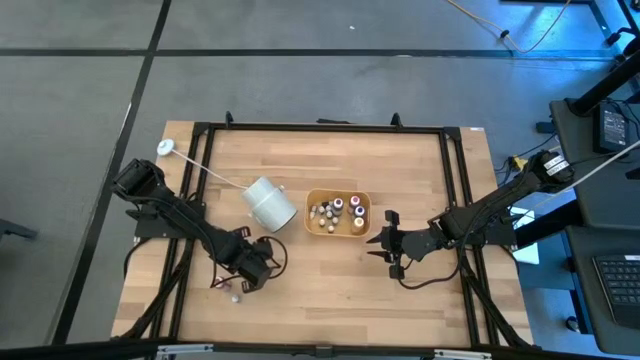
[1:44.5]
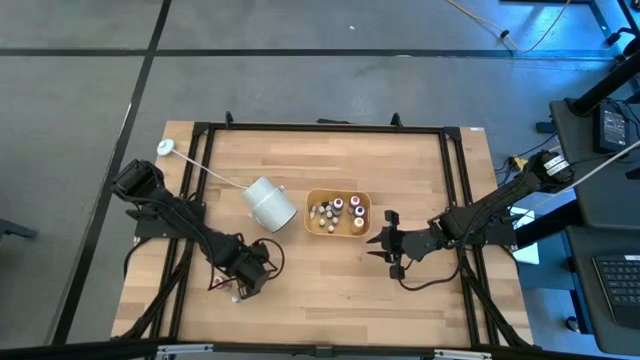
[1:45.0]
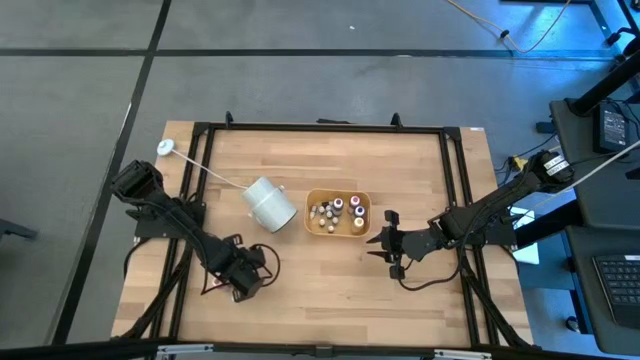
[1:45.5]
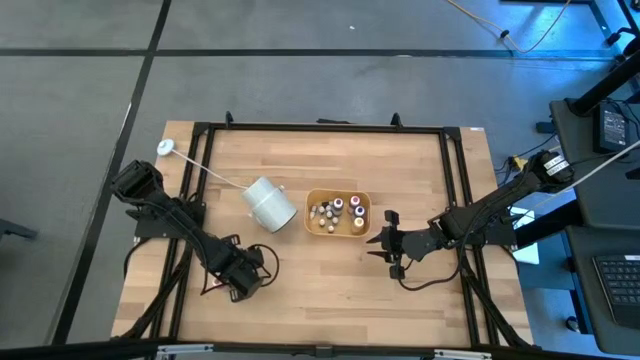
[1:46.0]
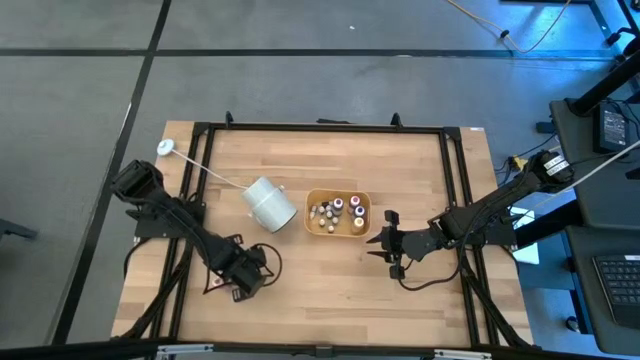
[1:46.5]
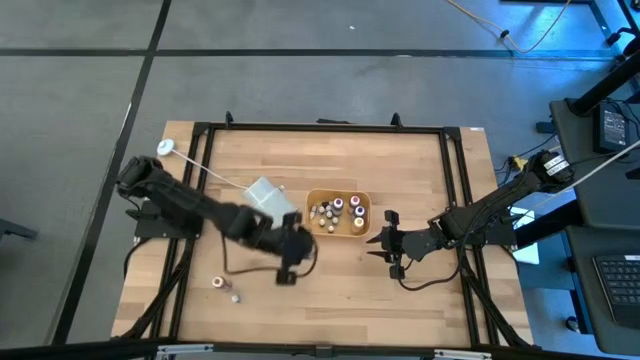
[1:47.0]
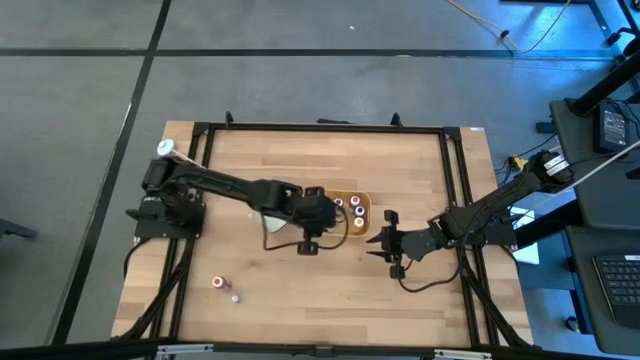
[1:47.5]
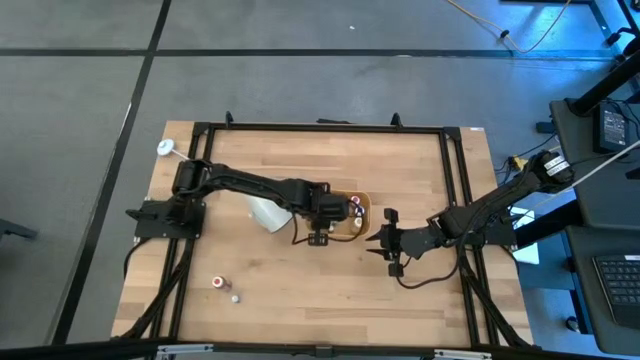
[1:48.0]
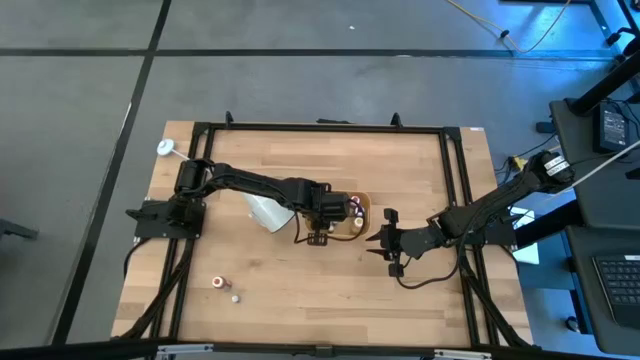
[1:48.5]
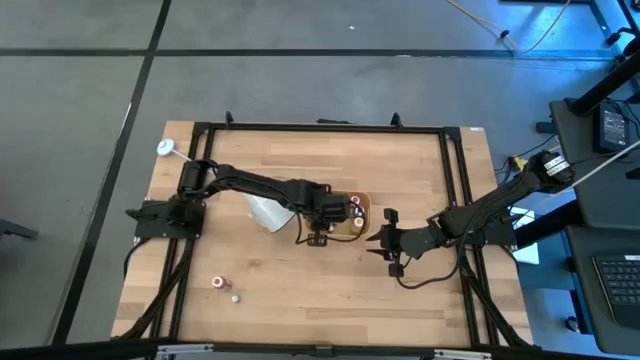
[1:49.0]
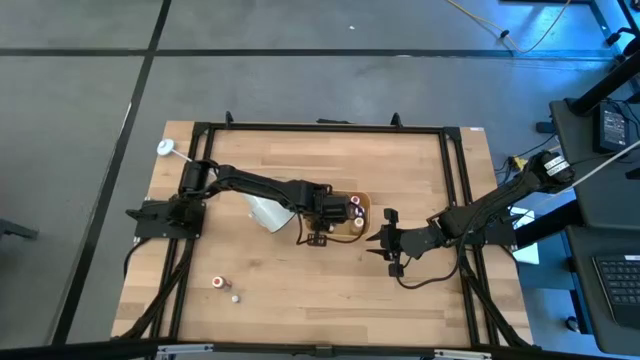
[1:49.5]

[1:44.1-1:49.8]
Task: Pick & Place food coloring
Put the small pink food coloring bottle into the yellow bin

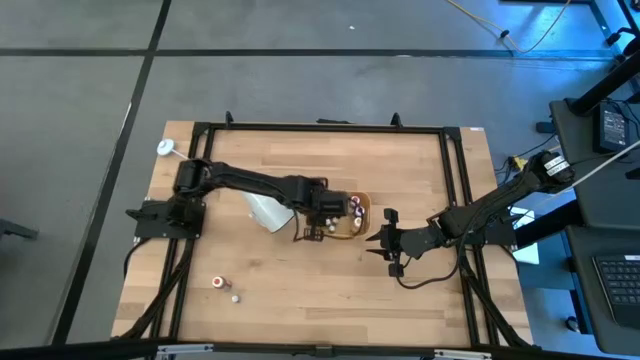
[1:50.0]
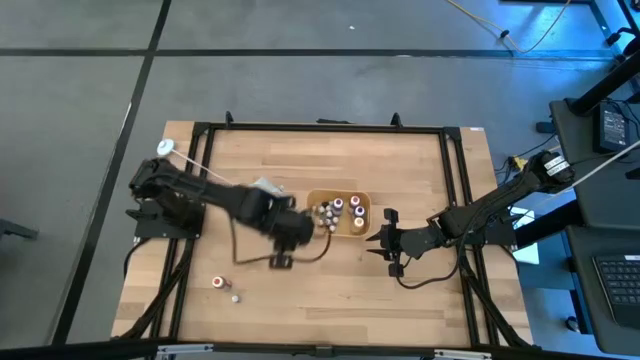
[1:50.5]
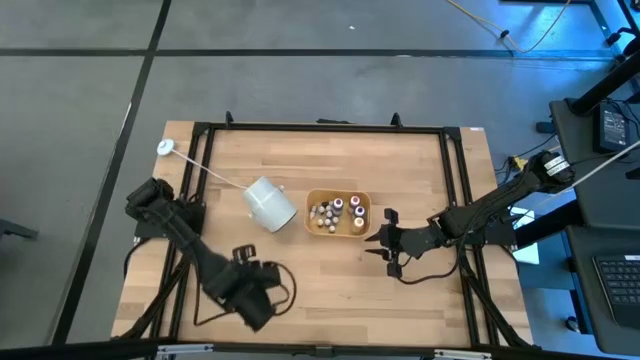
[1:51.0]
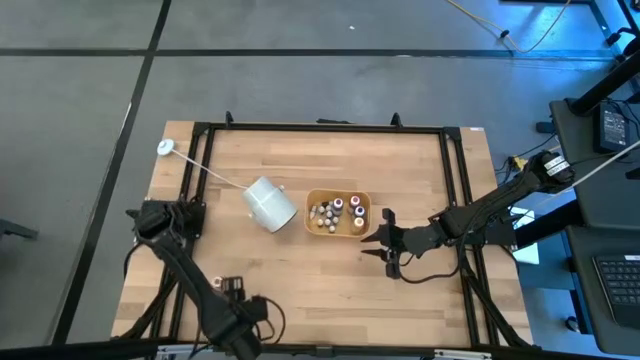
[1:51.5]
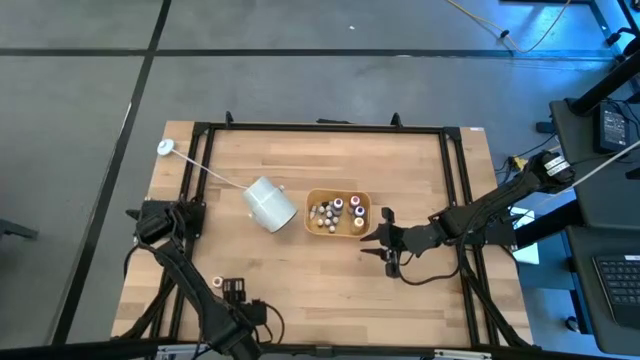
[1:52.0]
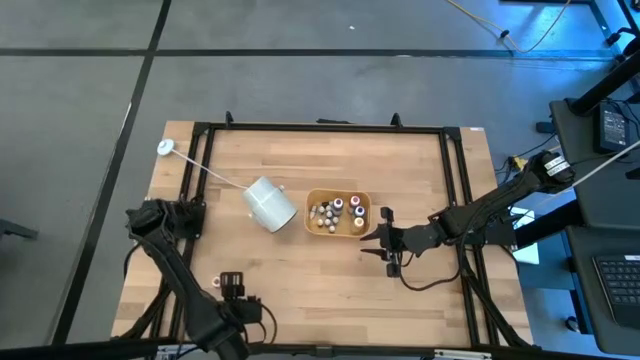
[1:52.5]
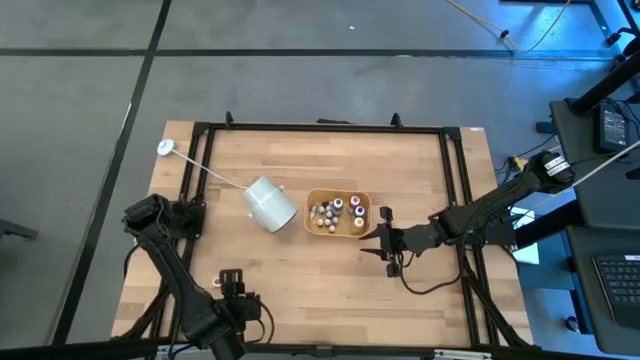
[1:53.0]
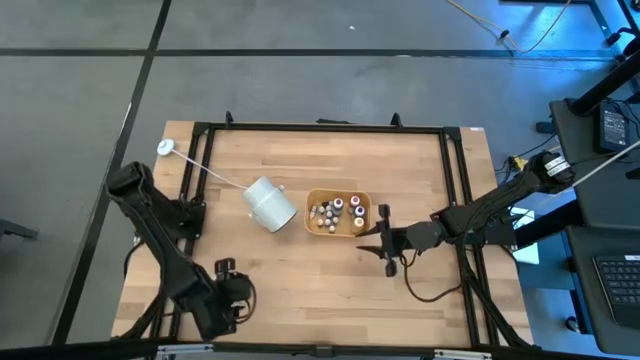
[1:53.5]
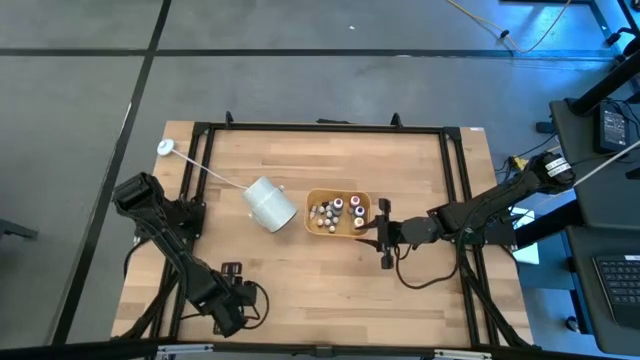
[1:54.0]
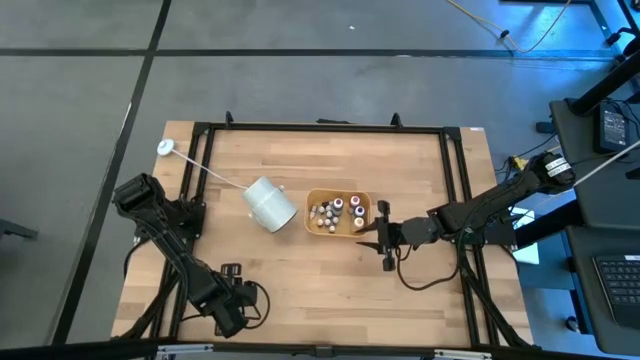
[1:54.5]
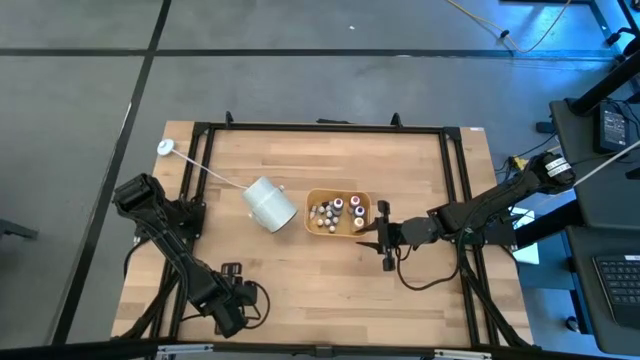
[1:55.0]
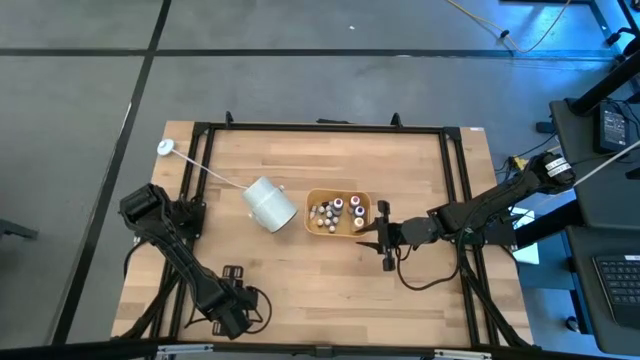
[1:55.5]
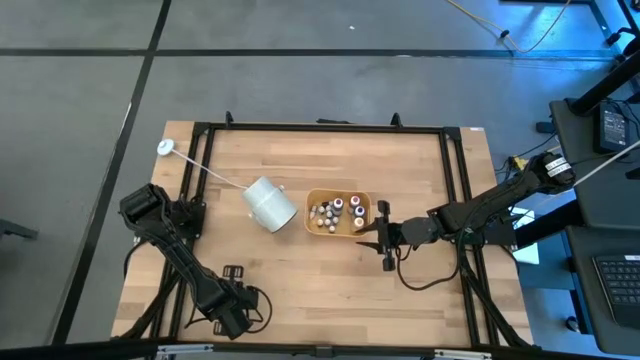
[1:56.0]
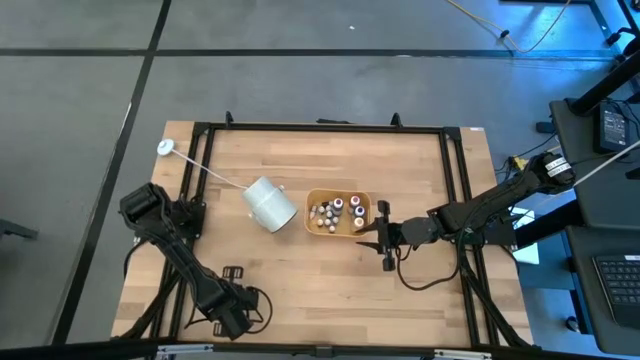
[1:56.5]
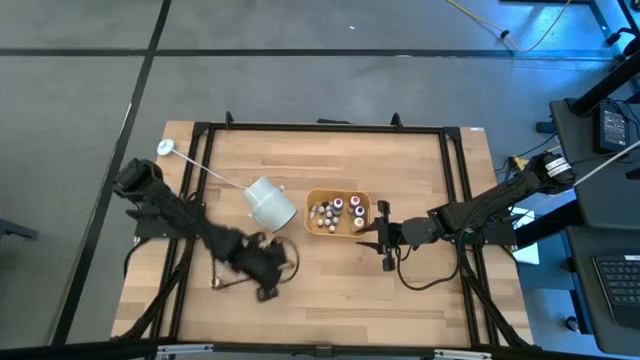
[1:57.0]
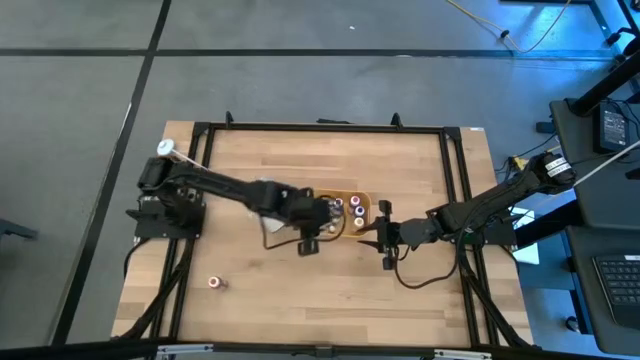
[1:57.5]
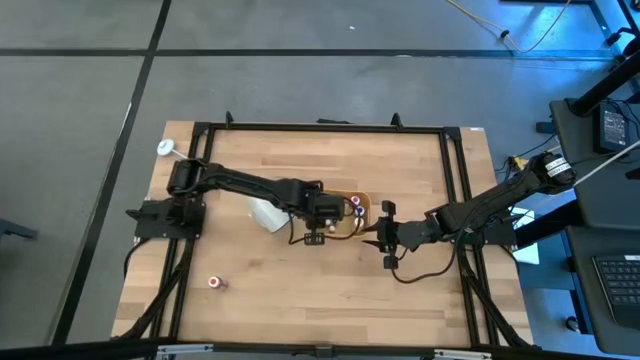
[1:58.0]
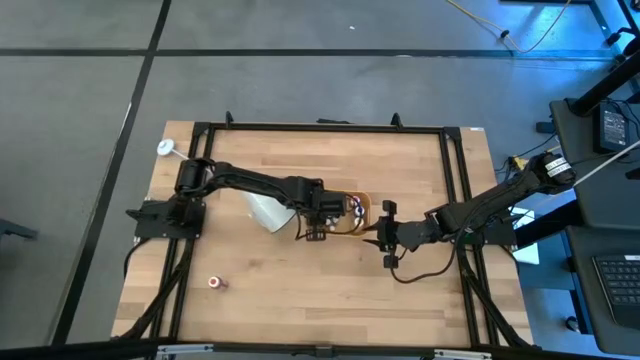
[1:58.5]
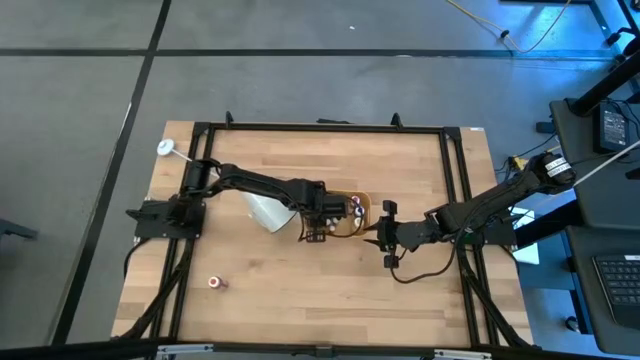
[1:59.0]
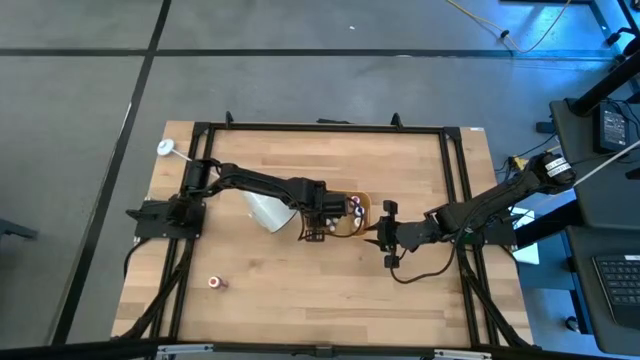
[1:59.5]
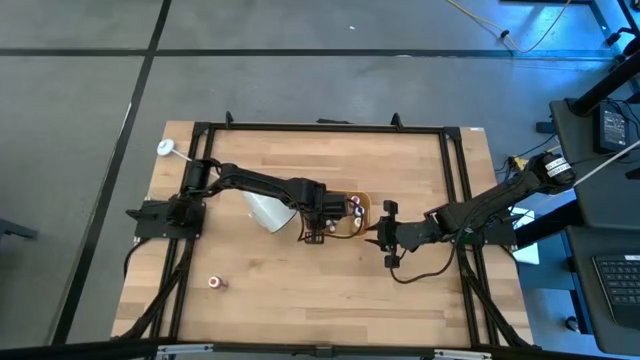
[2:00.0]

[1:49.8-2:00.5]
Put the small purple food coloring bottle into the yellow bin

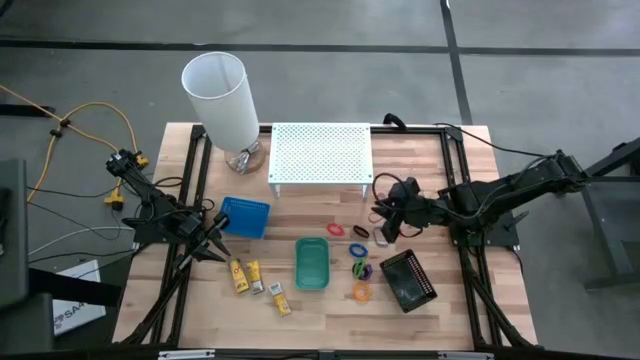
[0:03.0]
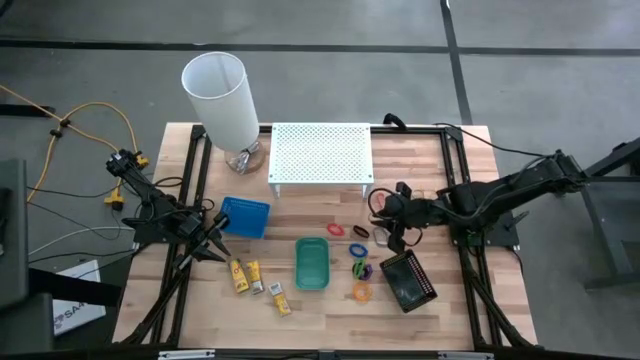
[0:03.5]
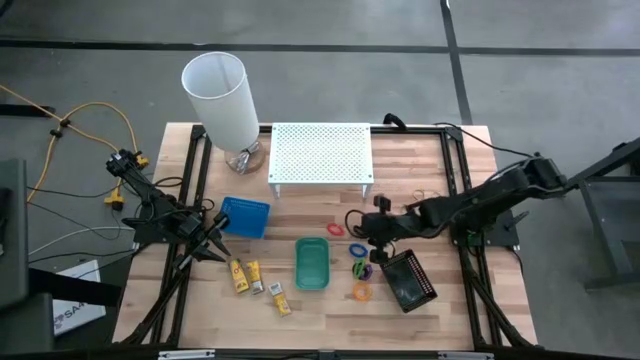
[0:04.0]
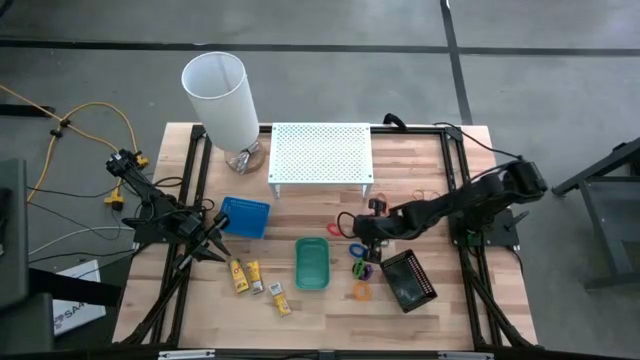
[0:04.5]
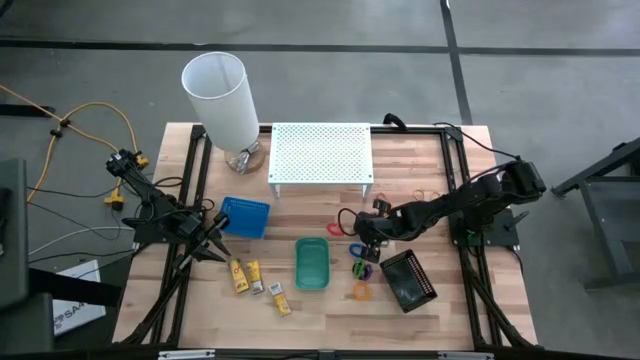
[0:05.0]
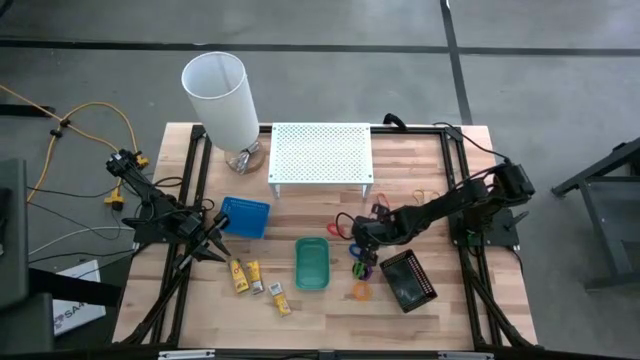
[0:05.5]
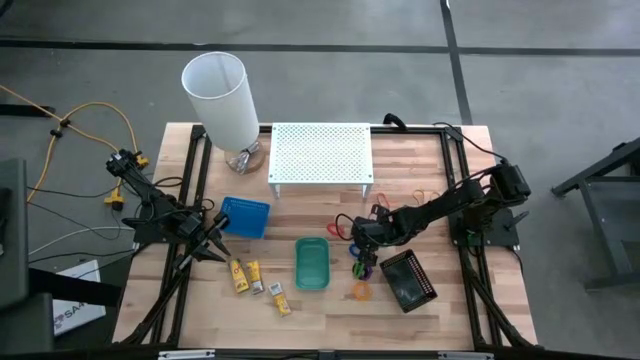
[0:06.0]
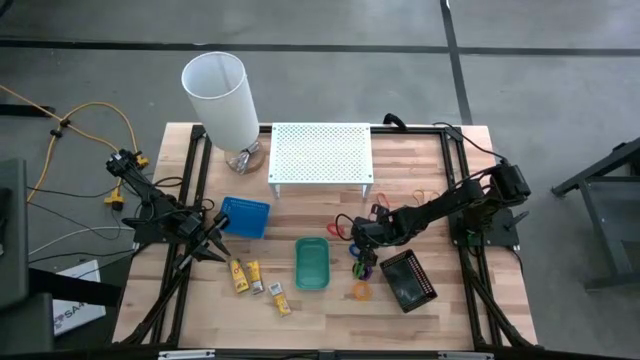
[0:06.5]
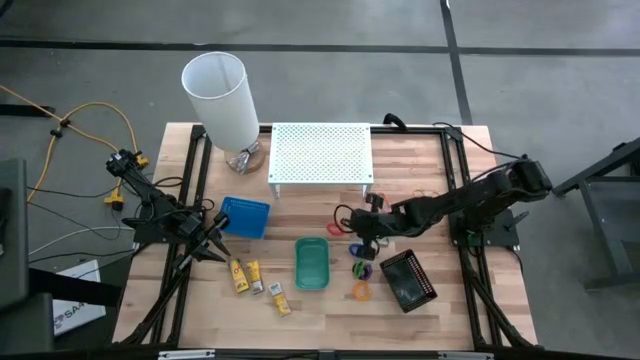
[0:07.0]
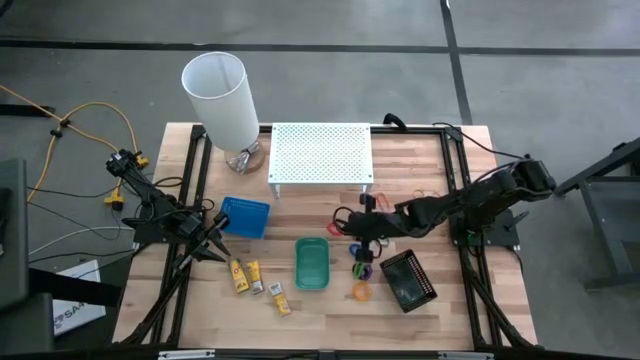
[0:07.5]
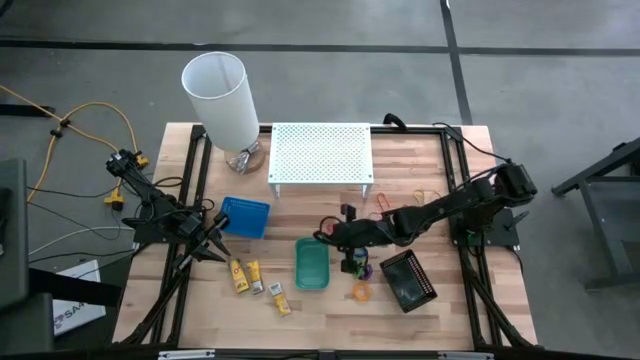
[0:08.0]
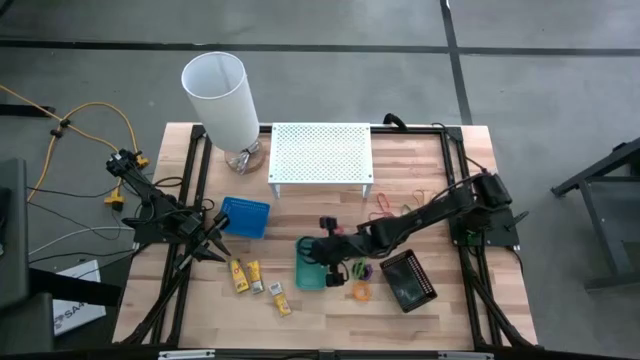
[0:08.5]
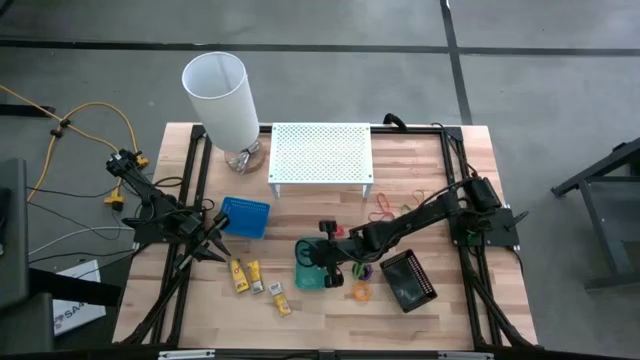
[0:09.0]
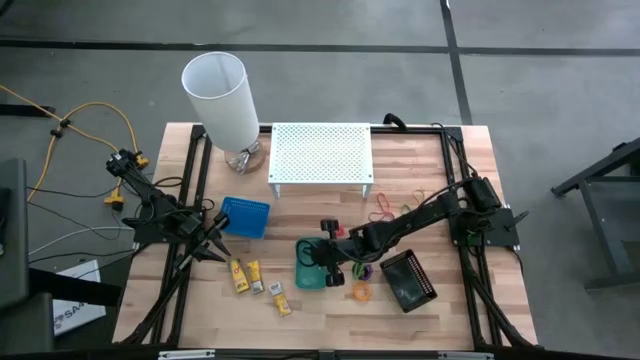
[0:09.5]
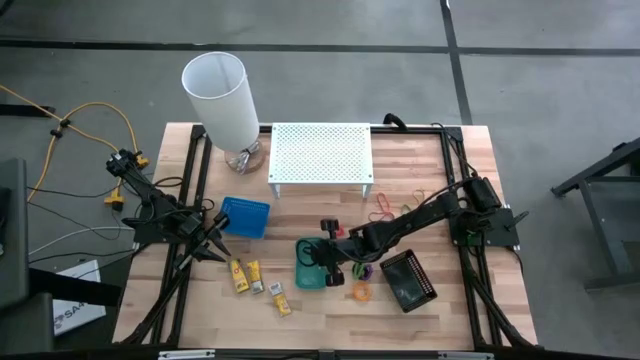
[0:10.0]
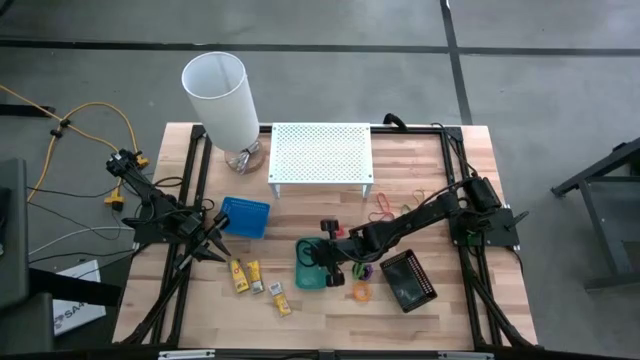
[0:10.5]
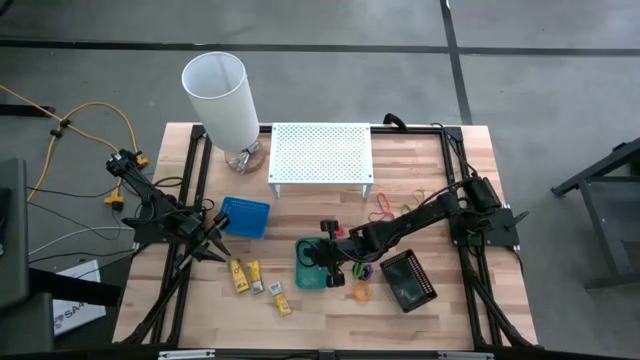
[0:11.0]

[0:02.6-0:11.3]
Task: Pick & Place Office Desk Supplies
Put the black rubber band into the green bin
